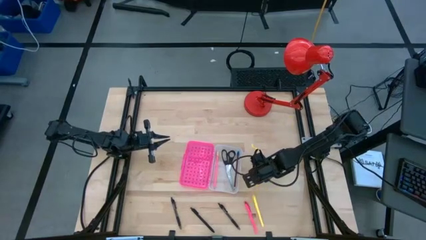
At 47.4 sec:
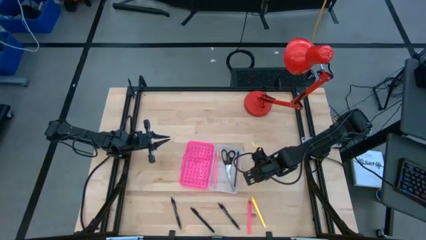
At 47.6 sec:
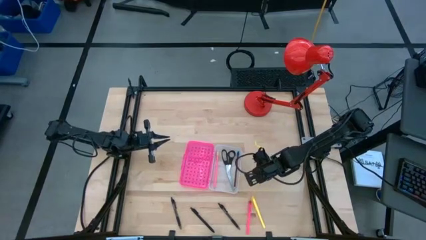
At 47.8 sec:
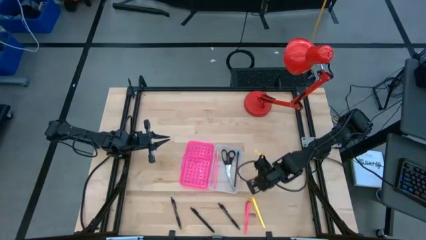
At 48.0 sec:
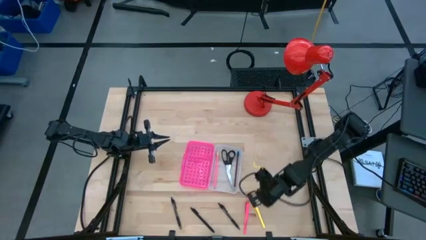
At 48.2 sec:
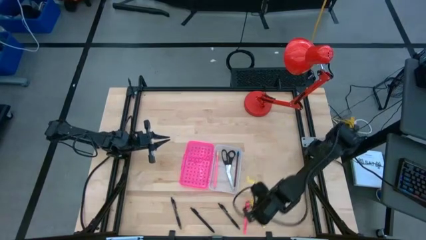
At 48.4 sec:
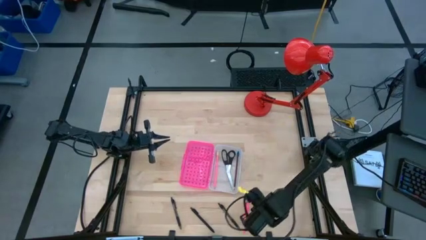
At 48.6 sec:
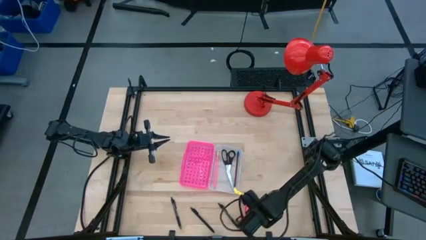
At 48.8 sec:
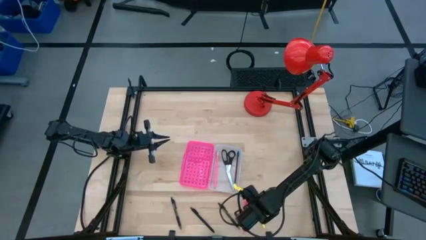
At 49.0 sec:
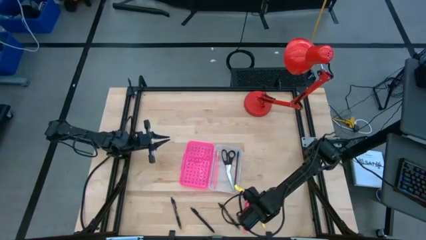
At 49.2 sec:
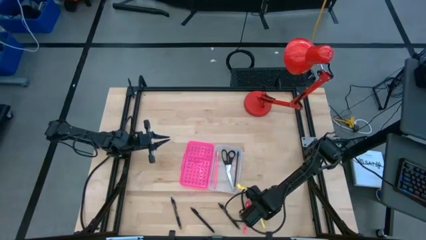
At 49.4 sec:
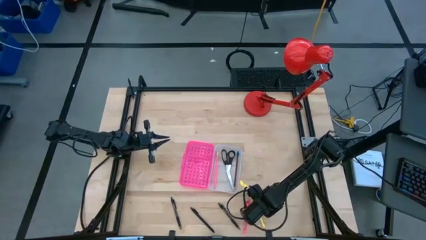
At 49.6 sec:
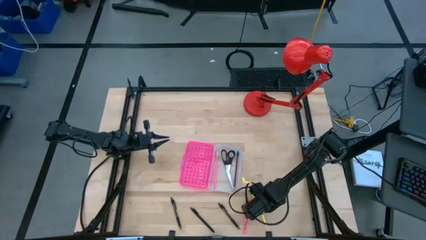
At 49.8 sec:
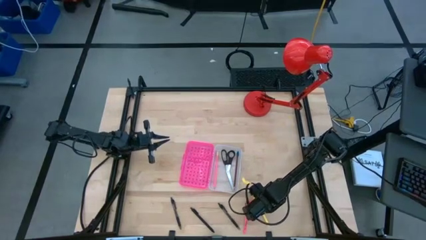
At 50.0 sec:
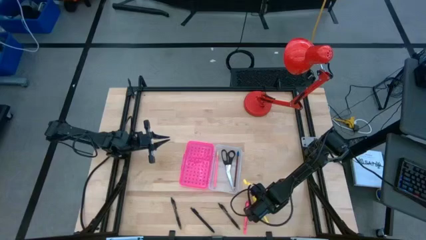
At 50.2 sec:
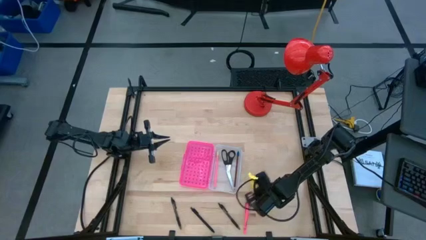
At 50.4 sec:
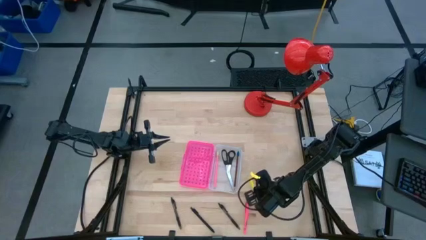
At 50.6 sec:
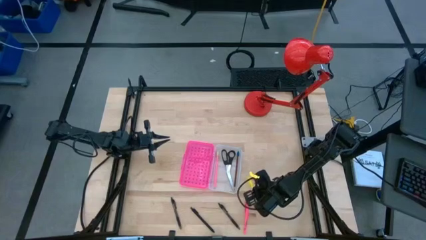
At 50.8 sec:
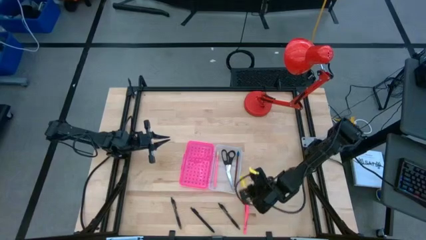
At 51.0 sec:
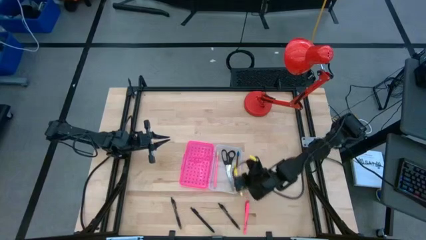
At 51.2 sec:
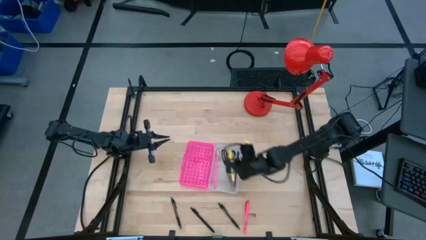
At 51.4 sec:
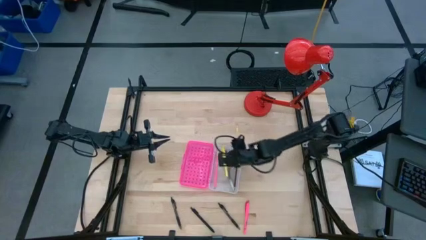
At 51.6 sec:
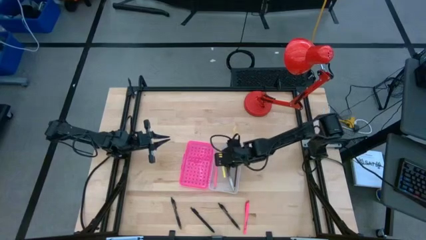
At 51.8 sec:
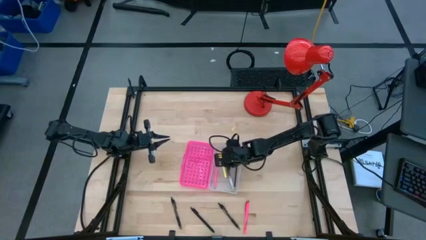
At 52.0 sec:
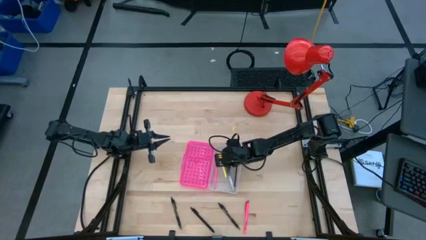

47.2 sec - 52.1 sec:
Task: Pick & place school supplies into a supply box
Put the yellow pen into the pink box

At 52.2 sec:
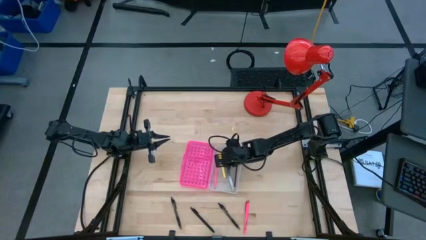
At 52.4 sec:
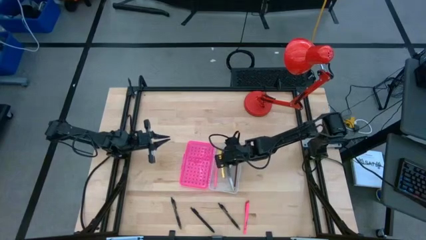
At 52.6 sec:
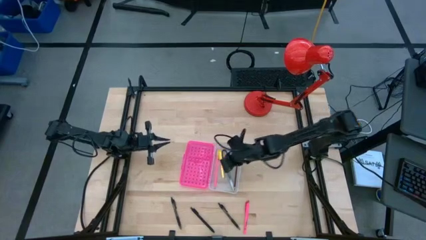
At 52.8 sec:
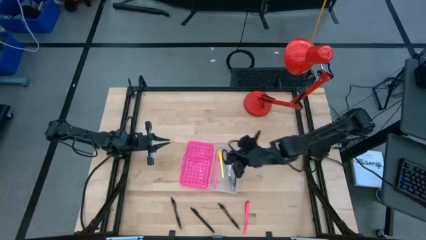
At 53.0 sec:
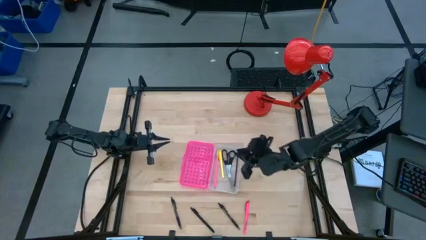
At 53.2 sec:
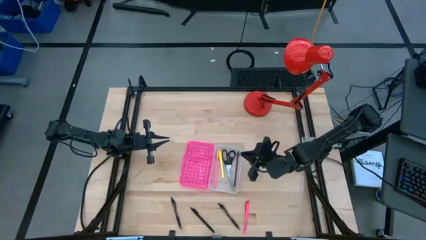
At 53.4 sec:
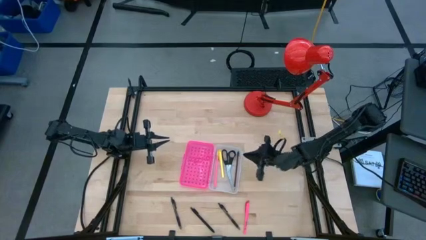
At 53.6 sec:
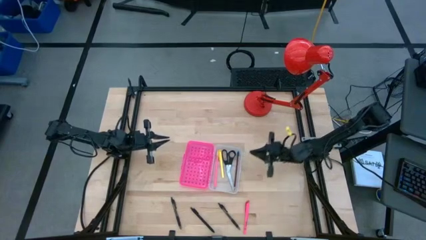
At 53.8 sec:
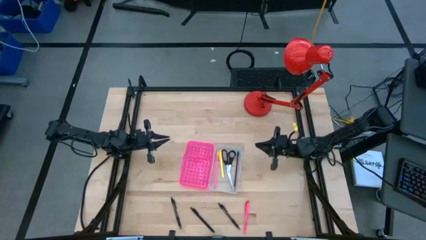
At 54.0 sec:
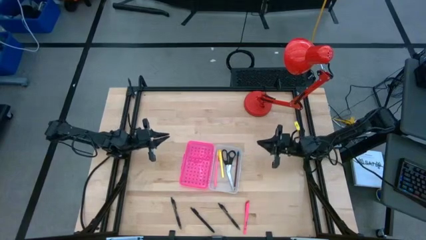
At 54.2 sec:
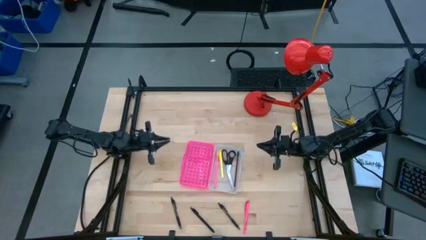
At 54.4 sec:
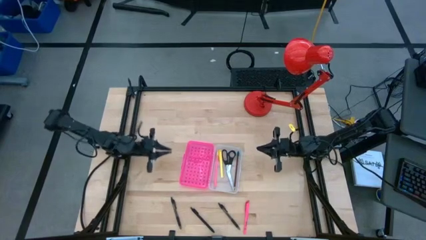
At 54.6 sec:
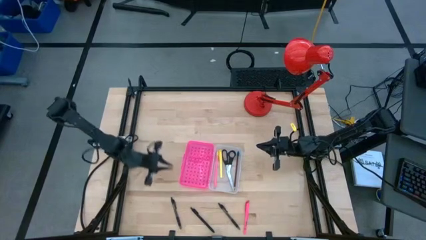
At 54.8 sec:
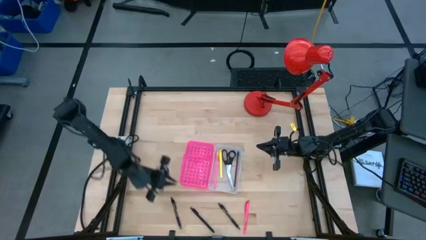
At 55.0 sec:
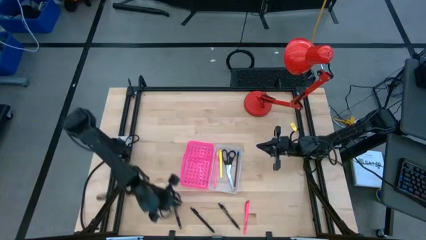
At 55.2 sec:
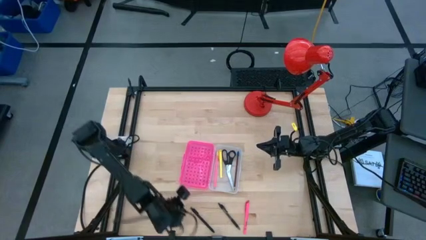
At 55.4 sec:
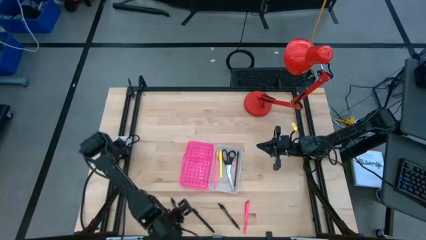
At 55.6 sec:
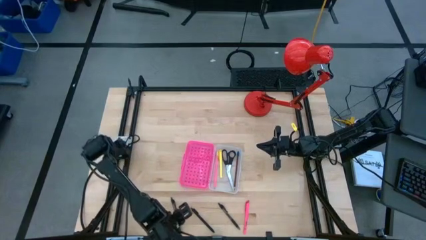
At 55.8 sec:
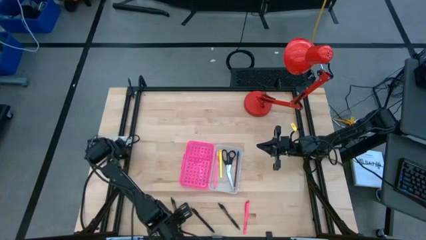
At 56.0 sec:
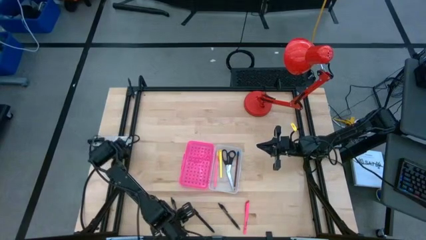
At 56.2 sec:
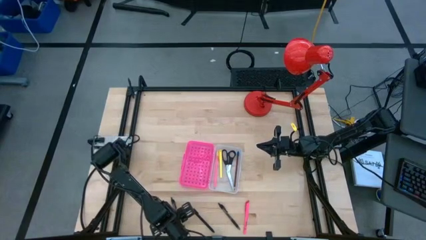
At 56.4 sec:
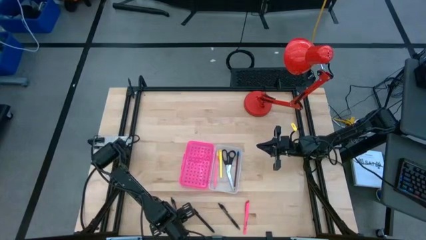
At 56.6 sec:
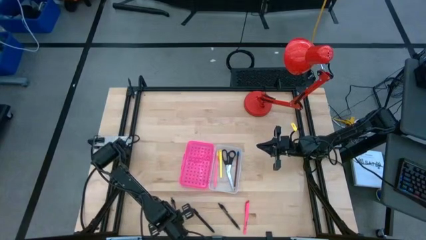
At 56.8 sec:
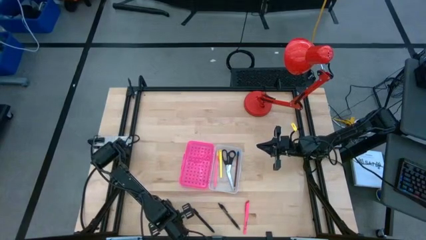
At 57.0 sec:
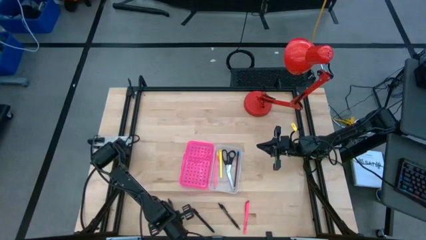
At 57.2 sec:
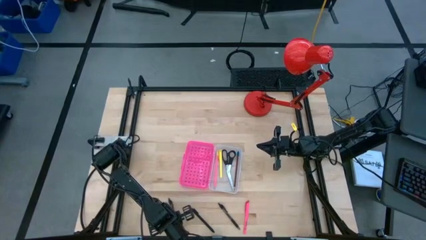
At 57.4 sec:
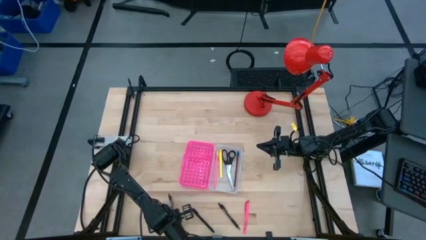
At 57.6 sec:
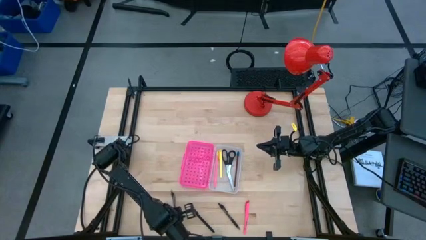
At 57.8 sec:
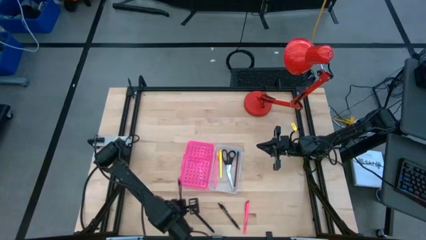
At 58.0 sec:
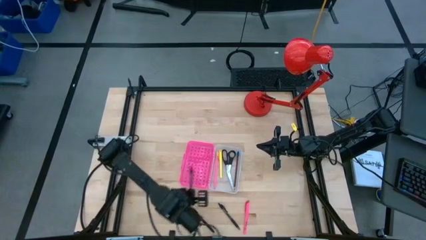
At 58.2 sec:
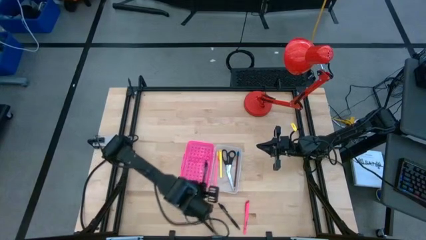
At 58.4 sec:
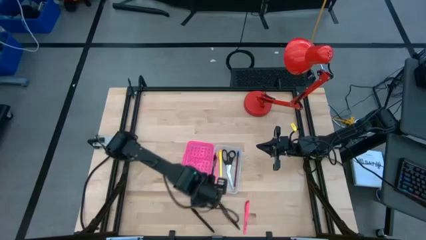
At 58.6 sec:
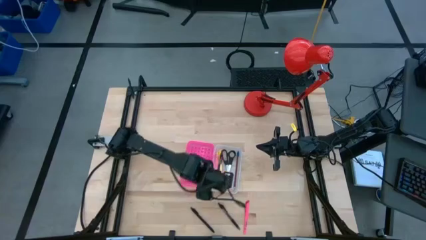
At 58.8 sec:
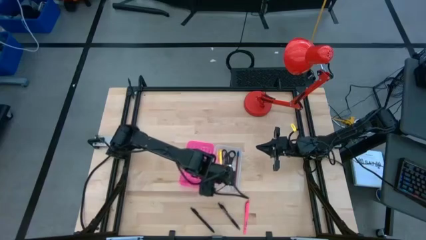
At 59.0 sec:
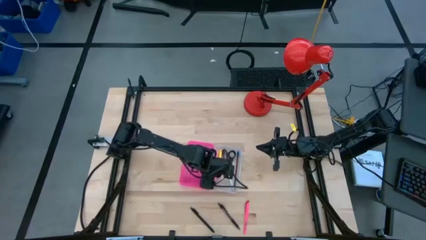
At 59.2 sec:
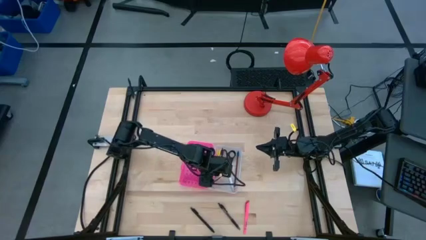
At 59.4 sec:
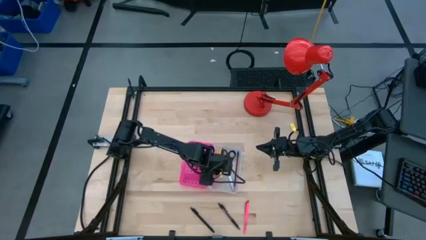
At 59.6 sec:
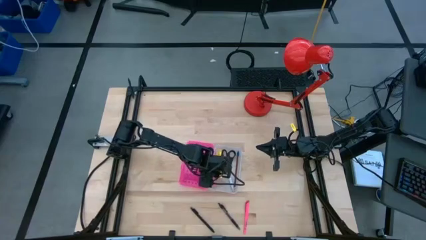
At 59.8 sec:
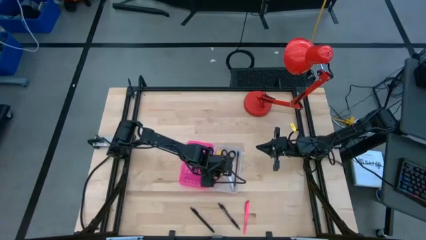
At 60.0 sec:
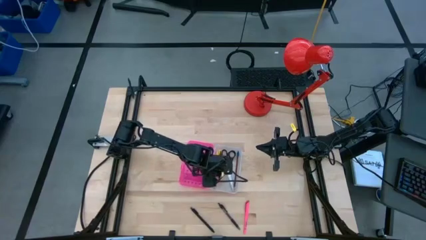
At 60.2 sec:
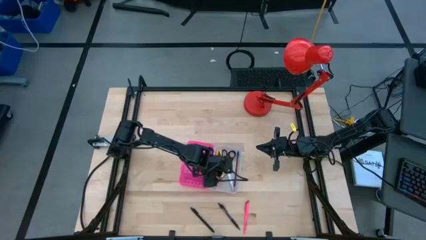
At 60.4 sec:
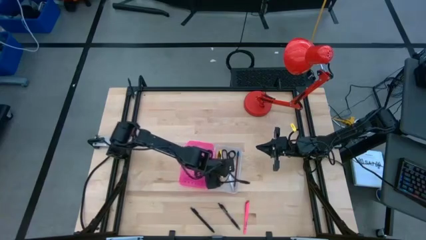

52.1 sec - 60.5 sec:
Put the left black pen into the pink box

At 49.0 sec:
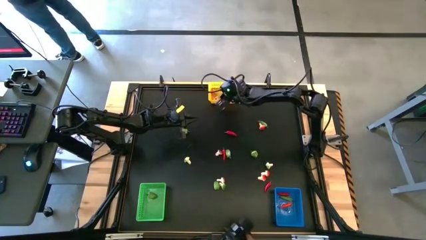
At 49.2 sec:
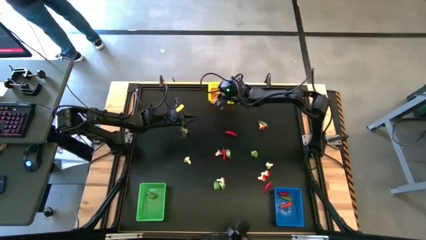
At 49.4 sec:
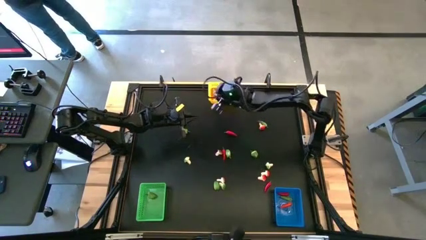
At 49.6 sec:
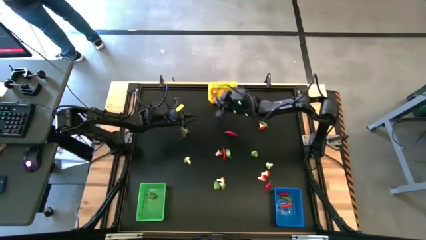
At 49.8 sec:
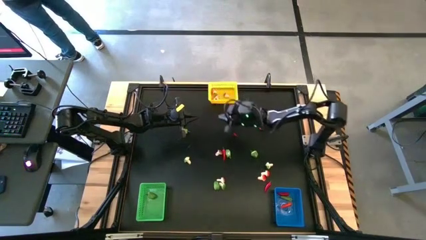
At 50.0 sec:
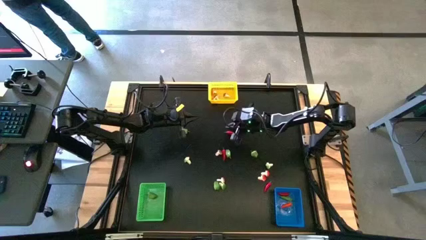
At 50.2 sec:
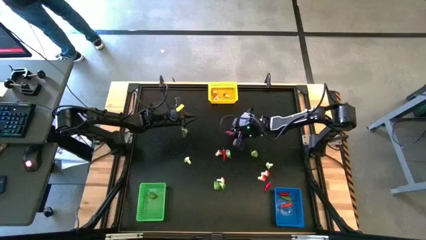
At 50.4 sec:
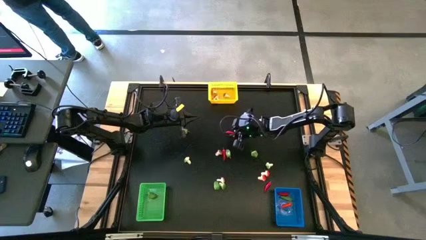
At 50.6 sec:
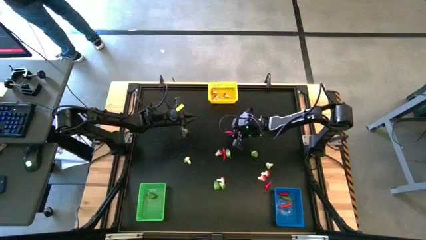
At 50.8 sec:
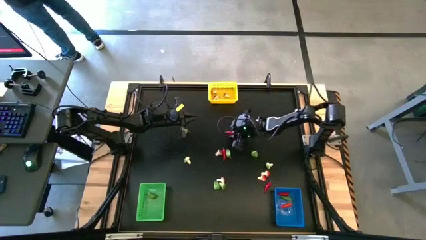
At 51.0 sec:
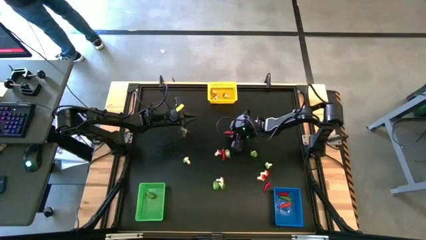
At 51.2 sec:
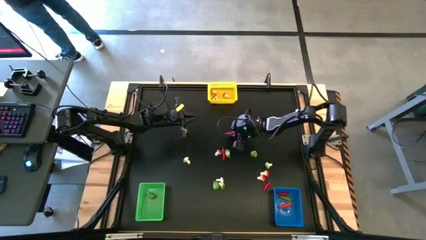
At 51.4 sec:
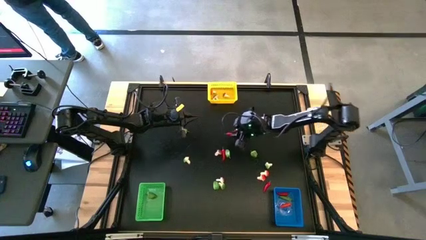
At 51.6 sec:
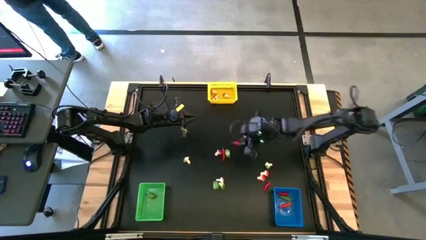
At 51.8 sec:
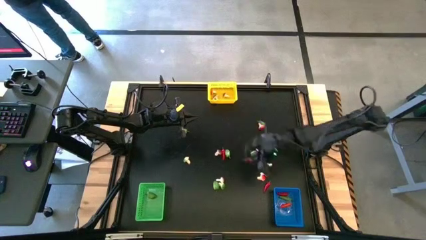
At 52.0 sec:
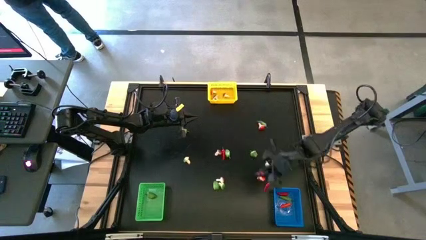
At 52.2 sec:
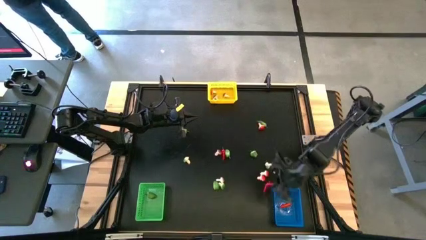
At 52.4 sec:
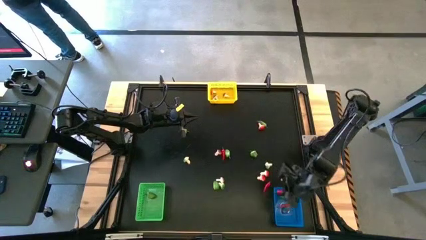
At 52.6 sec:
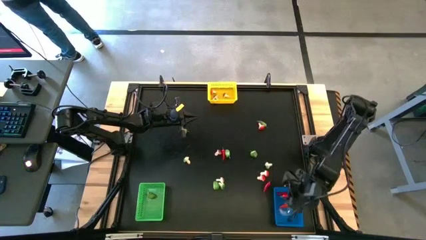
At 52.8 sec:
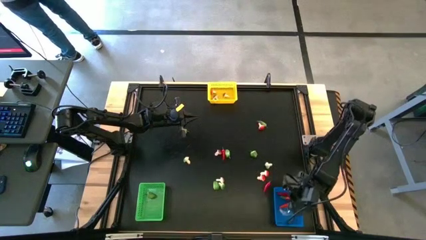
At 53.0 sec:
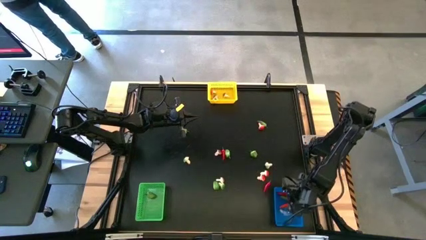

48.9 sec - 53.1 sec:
Task: Sort produce into baskets
Put the top left red chili into the blue bin
